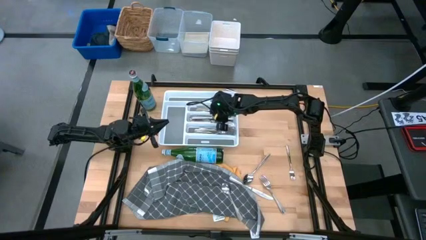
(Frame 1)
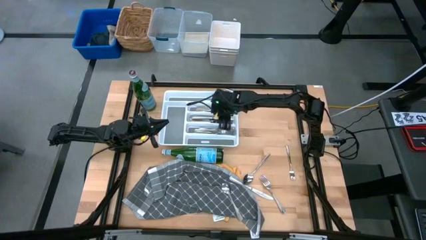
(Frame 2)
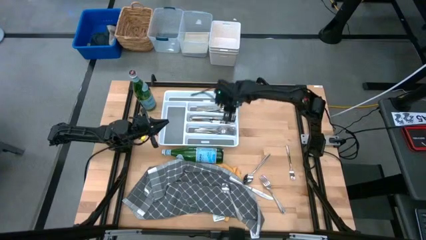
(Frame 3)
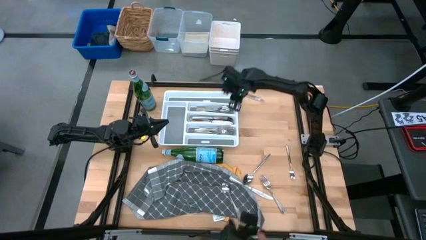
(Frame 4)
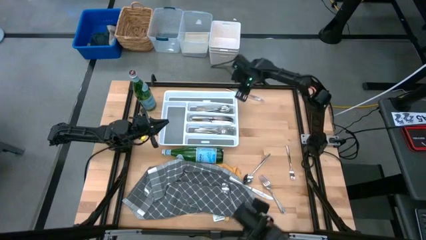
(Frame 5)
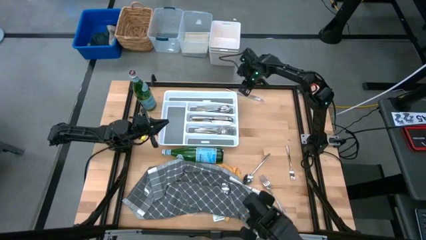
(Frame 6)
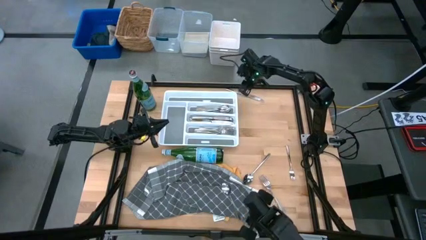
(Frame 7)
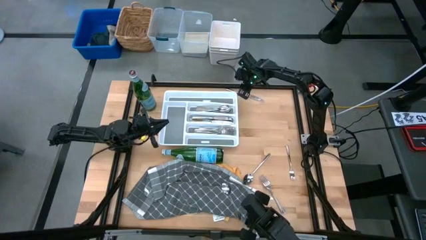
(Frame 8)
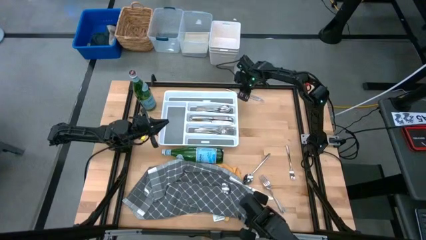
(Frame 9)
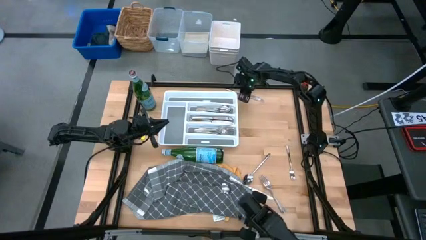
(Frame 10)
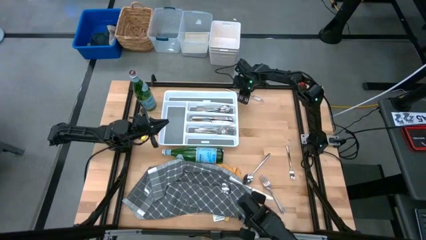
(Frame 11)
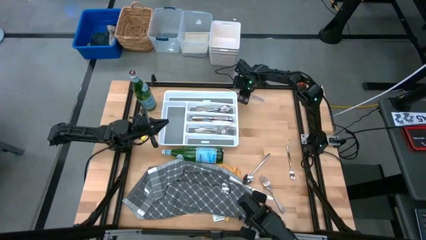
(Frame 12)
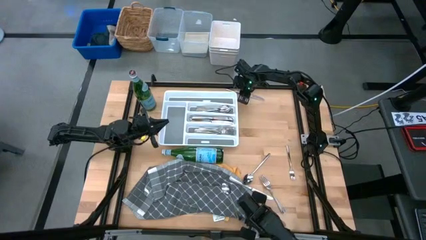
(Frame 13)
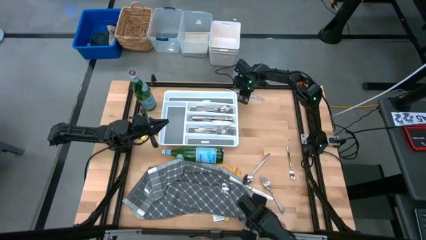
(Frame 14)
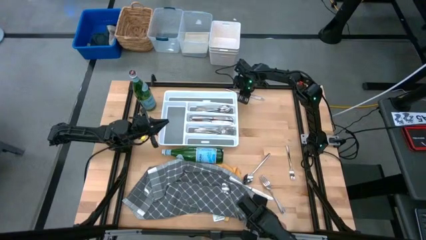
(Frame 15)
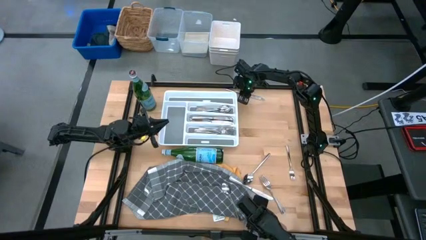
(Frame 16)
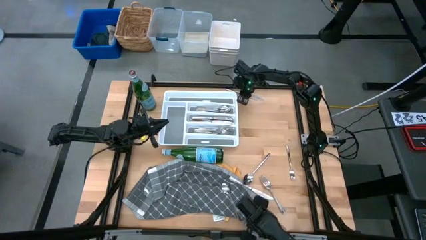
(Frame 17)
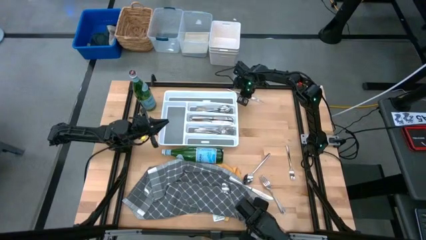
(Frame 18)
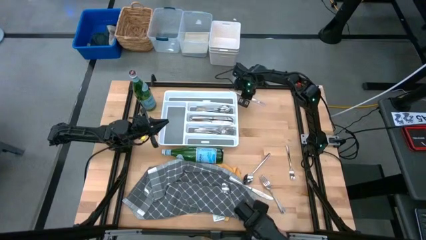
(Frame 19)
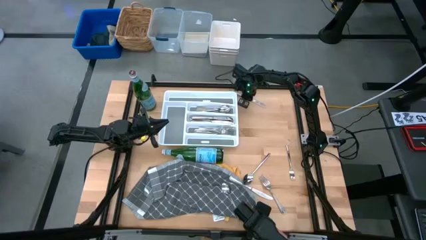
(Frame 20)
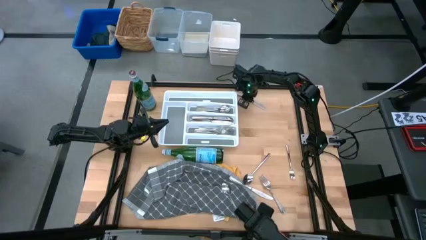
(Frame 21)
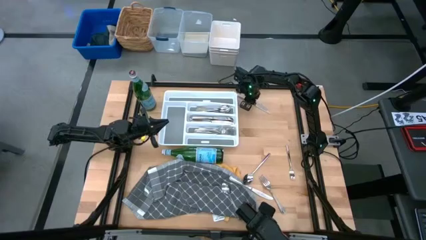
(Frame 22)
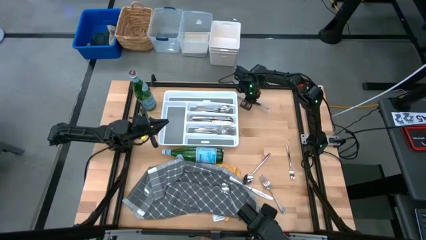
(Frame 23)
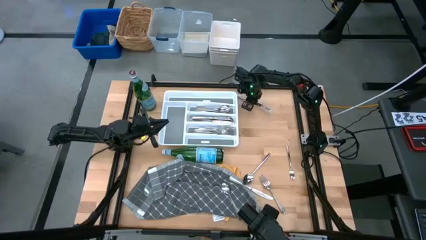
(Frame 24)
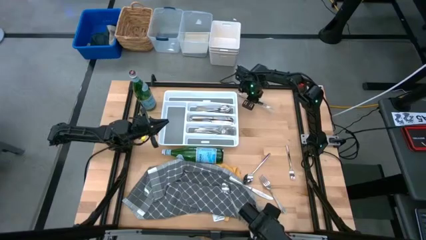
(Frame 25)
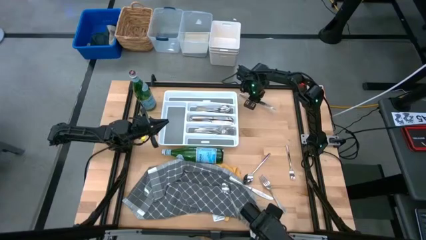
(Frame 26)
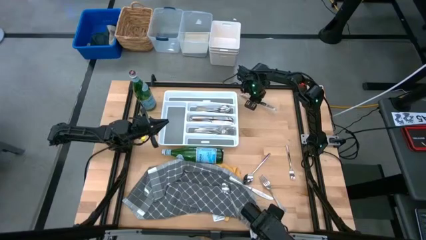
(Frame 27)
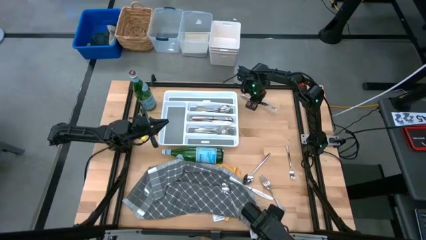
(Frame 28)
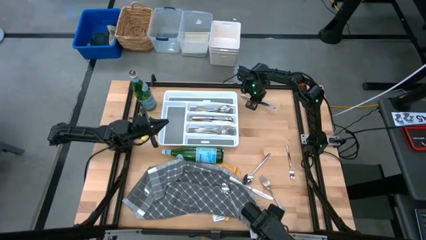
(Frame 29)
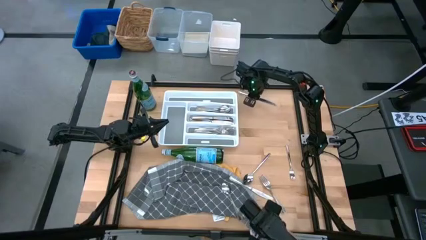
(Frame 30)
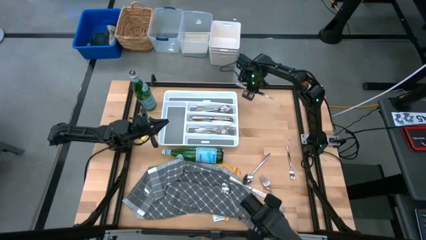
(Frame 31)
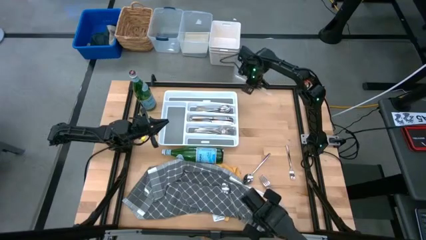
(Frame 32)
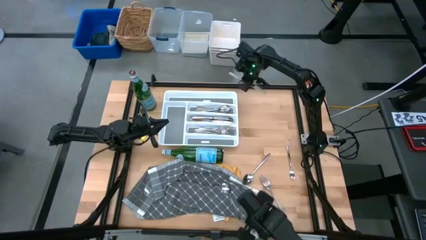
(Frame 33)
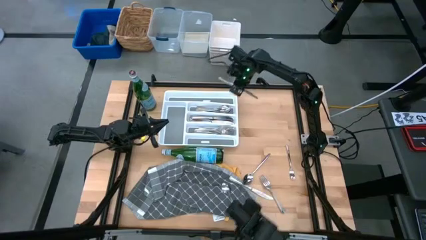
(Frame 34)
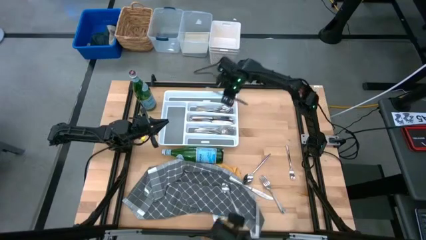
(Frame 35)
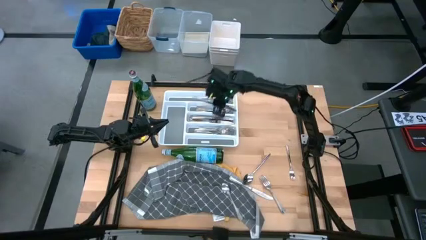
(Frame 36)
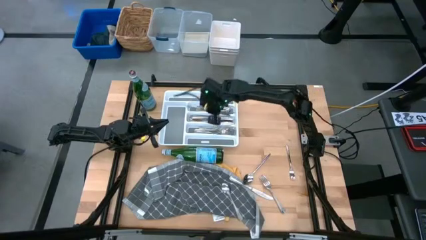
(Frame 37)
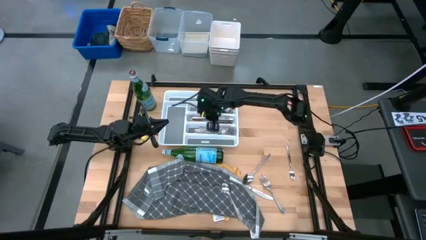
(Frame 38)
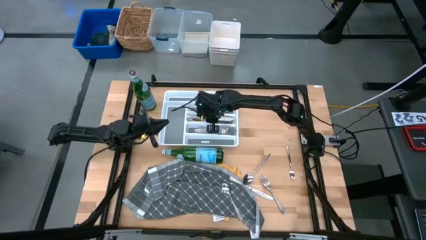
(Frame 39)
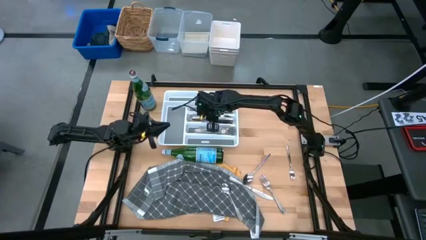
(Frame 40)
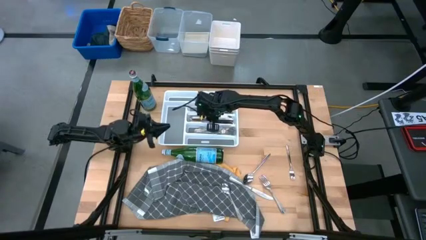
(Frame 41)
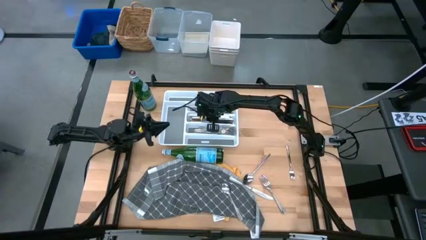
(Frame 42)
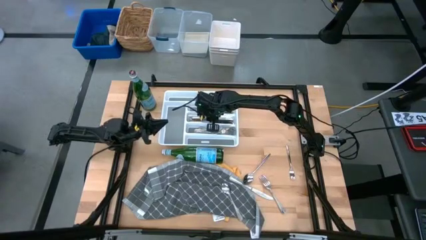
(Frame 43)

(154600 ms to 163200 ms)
Task: Sort silverware
Put the silver table knife into the silverware tray

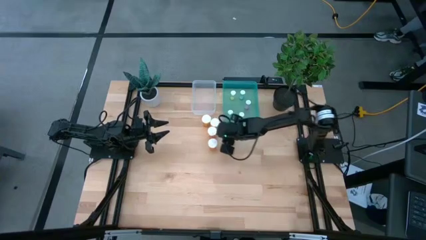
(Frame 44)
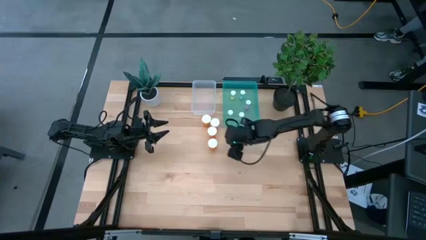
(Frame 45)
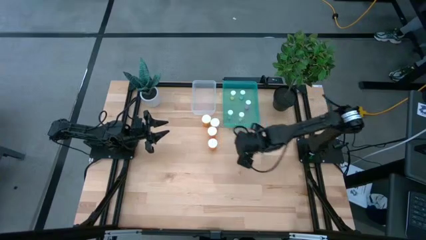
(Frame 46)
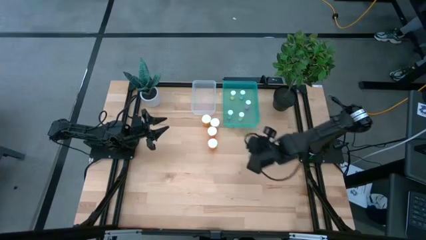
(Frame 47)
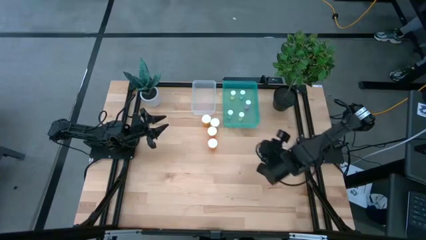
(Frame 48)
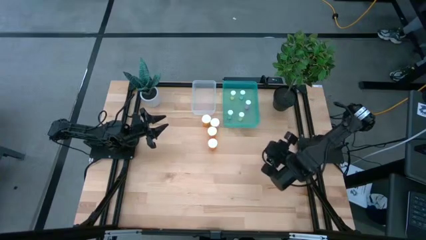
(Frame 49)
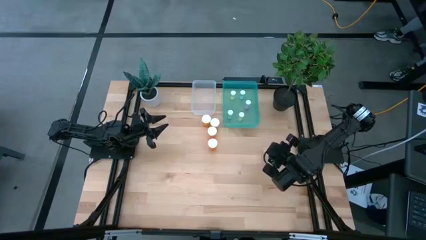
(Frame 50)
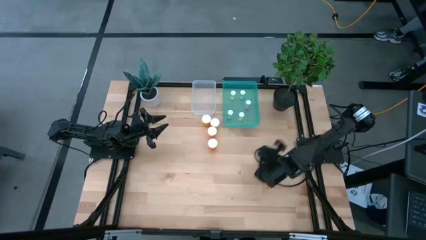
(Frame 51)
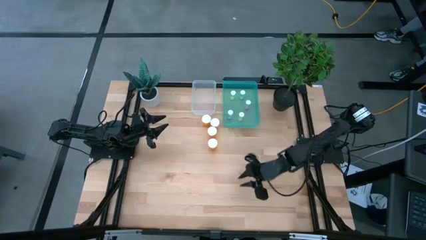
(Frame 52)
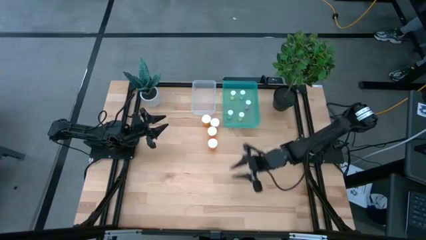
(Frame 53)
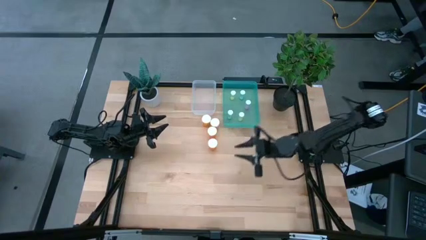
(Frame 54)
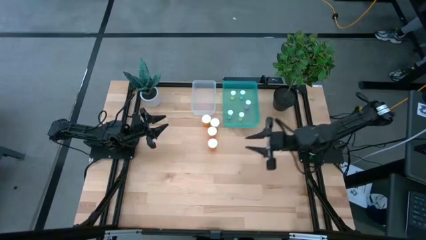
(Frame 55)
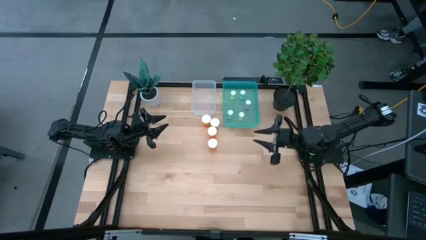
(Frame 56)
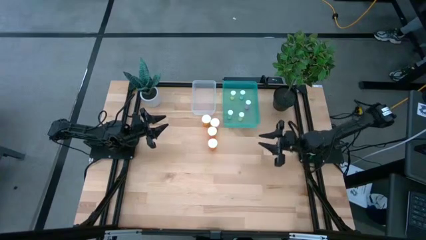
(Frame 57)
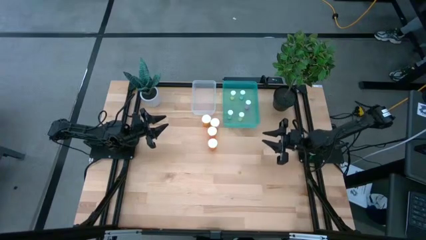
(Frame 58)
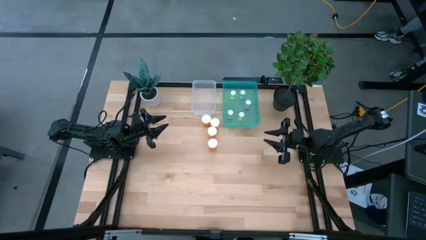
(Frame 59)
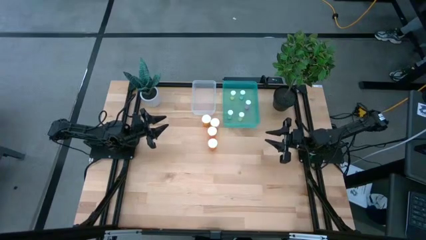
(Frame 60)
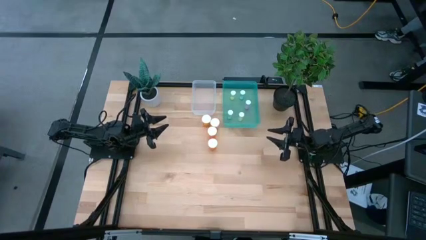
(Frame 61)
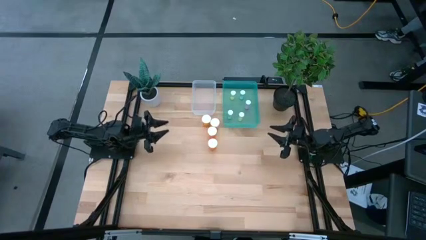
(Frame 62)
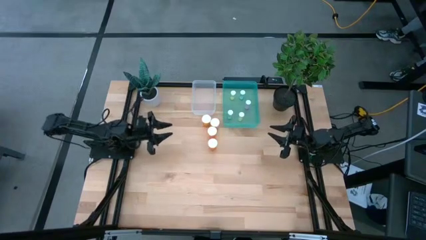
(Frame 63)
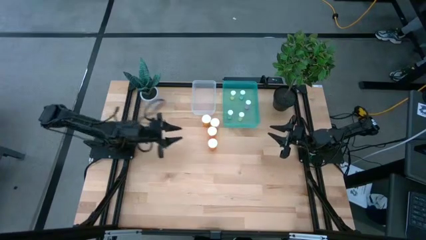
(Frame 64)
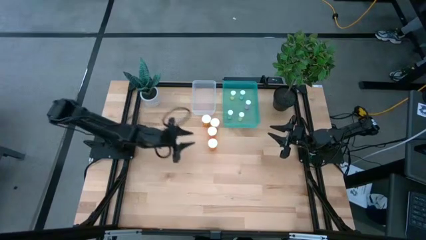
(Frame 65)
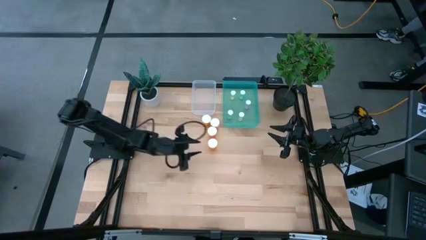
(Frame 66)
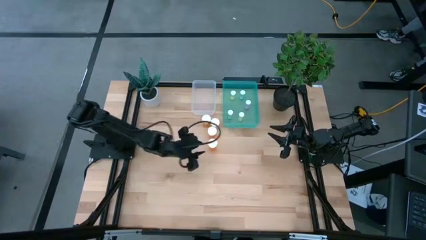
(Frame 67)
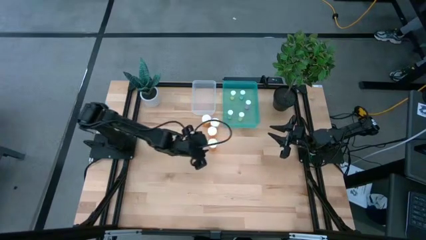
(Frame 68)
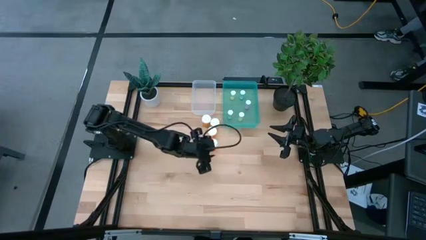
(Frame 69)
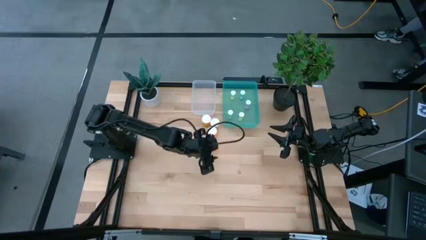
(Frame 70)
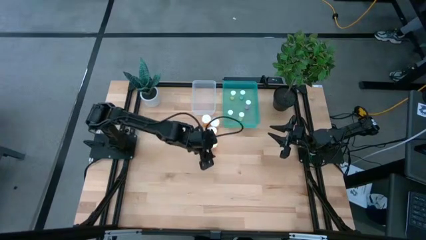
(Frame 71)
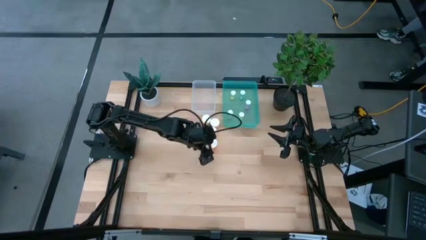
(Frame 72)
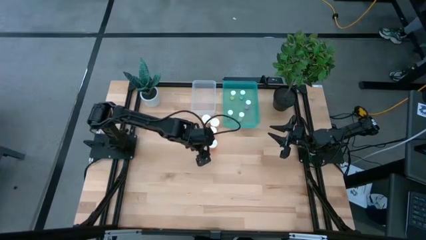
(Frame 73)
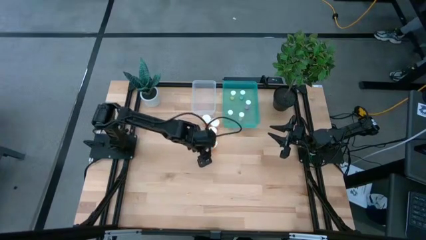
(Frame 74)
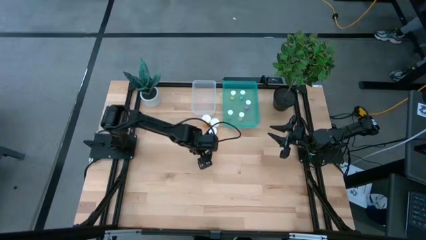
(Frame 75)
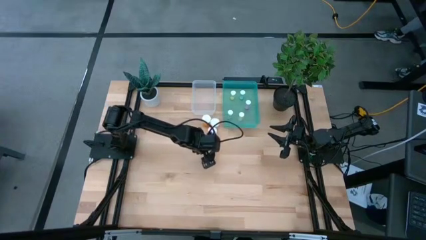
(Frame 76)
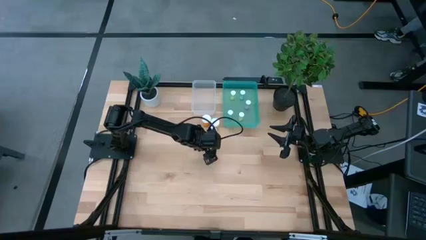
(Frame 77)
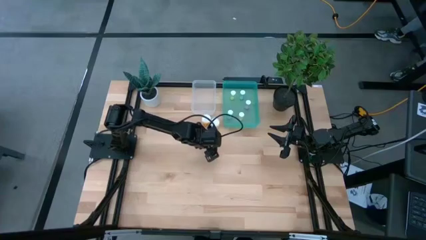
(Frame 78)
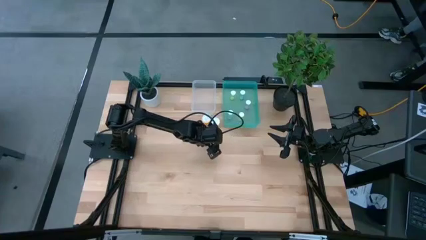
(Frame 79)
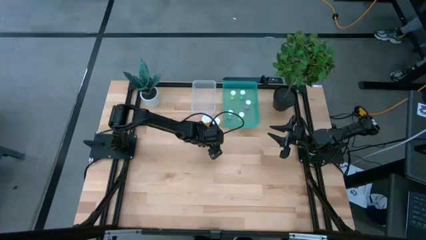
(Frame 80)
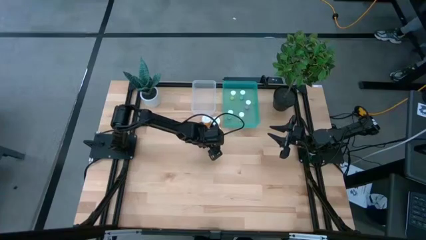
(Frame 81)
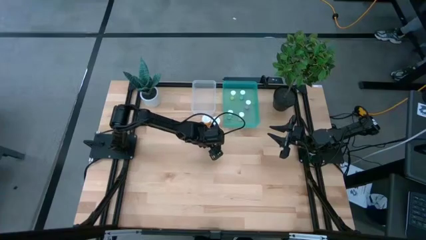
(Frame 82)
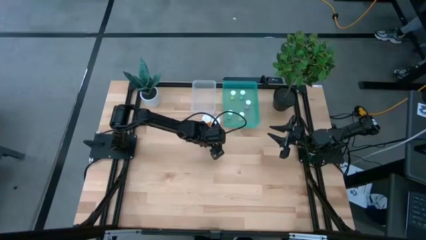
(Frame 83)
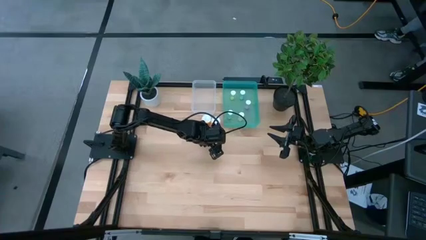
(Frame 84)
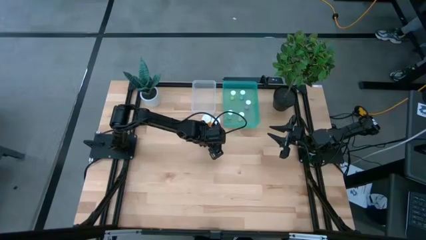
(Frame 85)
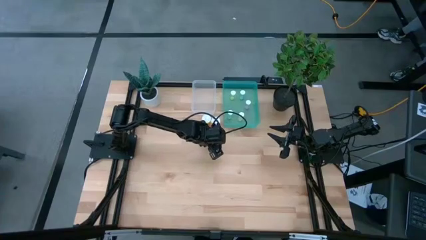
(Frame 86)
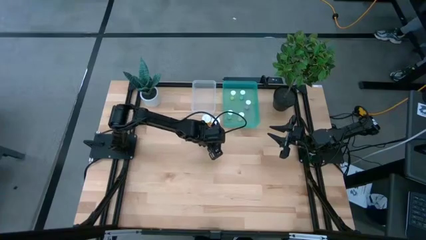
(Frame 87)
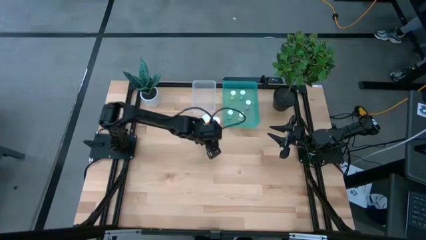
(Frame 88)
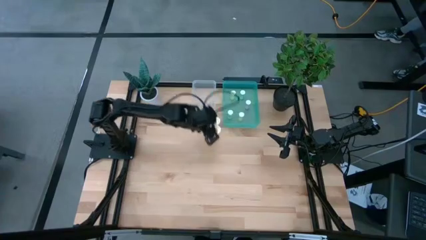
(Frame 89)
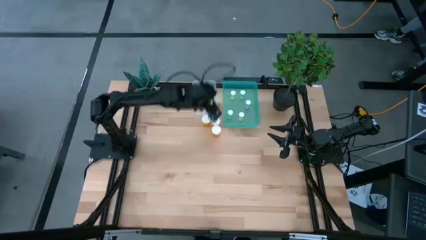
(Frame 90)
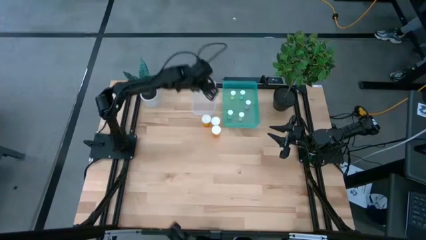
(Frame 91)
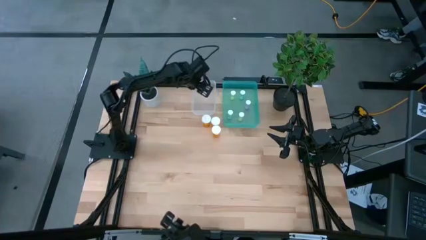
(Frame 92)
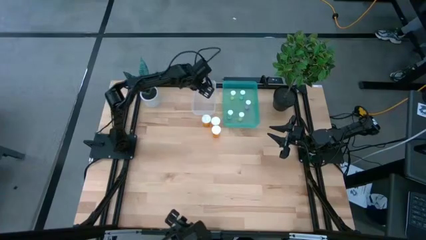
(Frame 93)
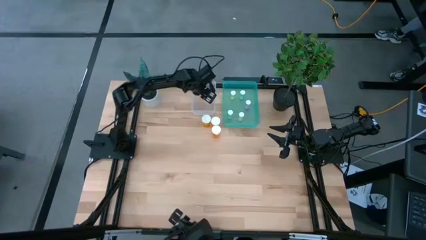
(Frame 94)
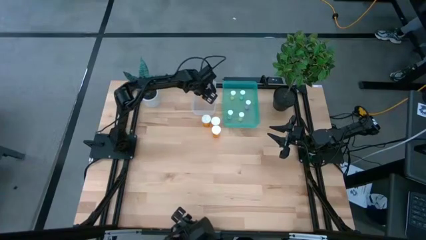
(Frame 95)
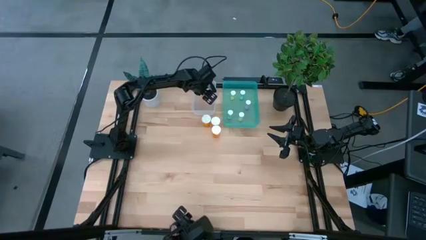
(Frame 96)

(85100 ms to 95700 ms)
Task: Pick and place medicine bottles into bin by pill shape (circle, oval)
Put the orange capsule bottle into the transparent bin
